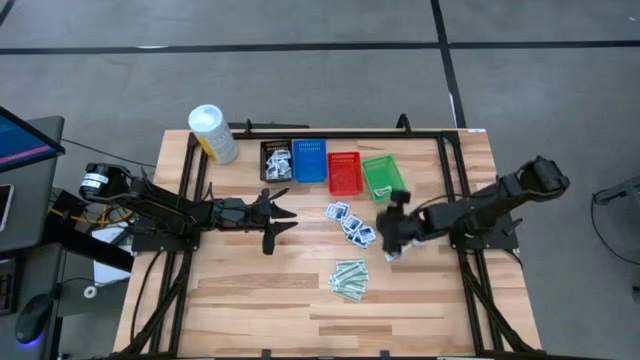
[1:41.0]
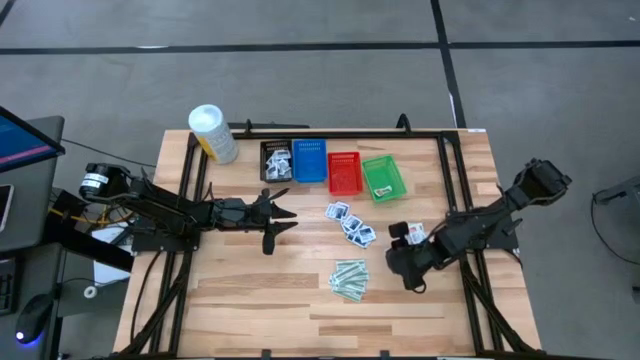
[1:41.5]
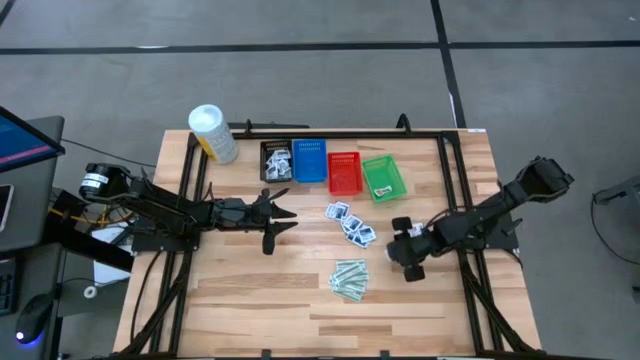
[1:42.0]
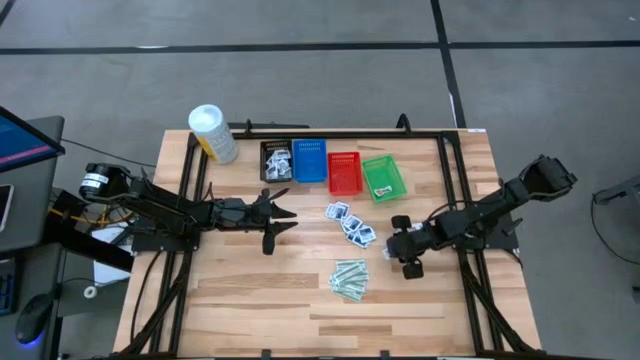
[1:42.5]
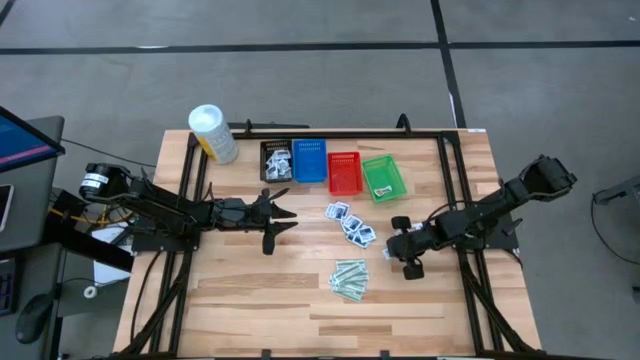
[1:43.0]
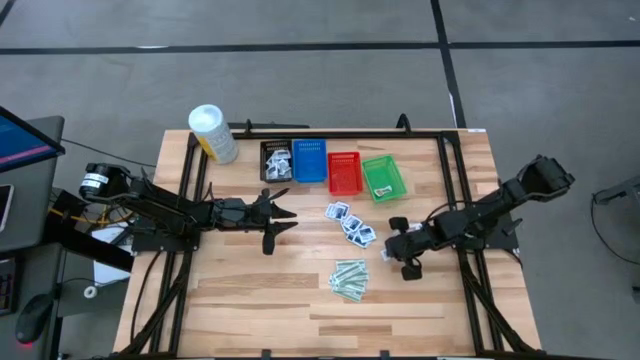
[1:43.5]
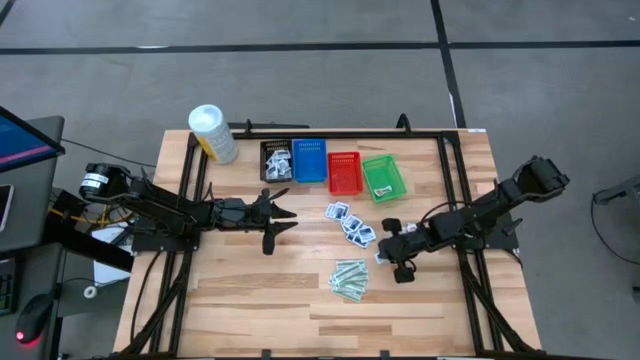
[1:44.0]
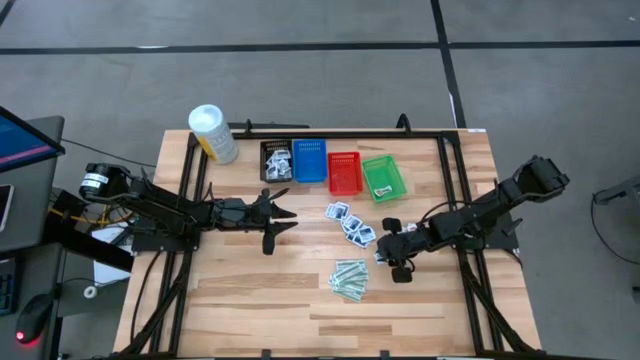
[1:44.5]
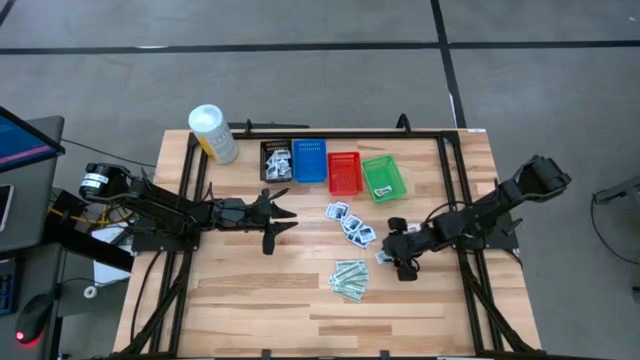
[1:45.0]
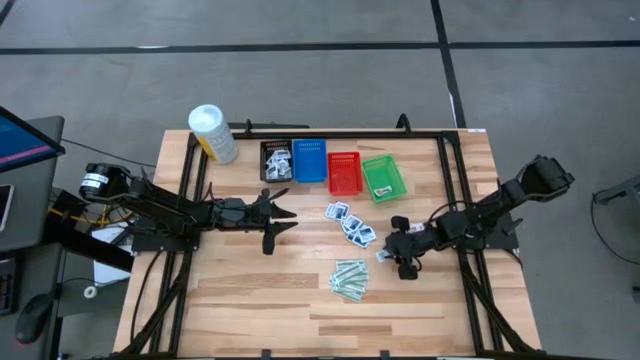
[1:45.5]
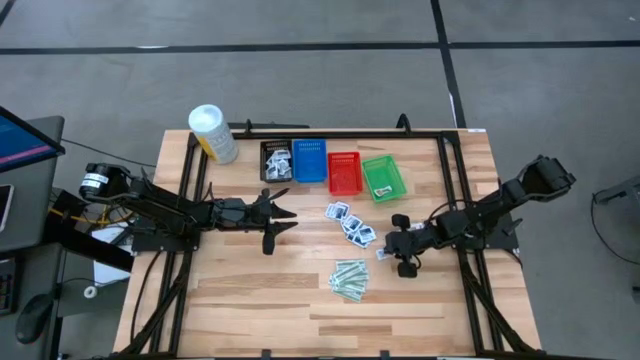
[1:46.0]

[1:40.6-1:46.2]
Task: Pick & Place First Aid Supplies
Put the orange pad into the green bin

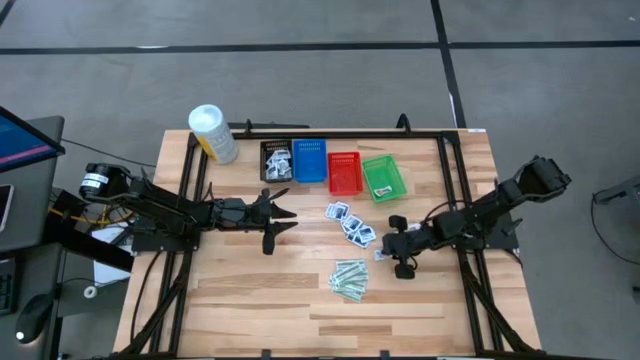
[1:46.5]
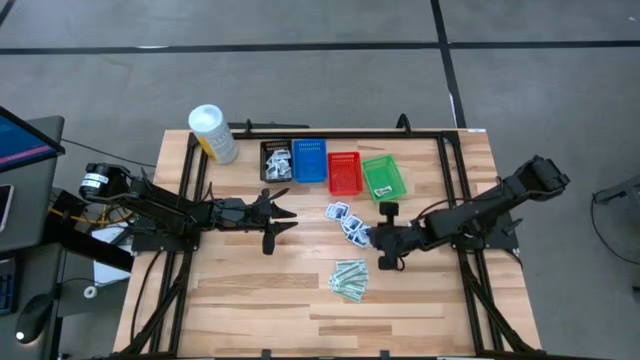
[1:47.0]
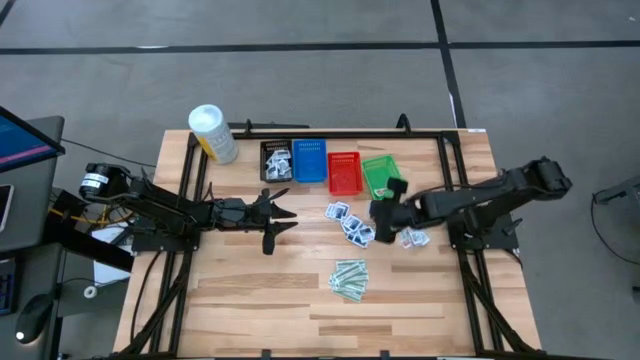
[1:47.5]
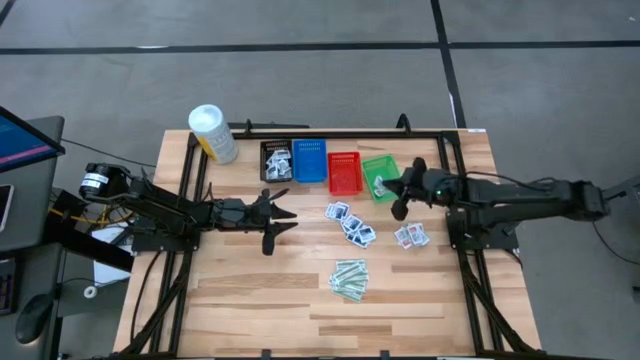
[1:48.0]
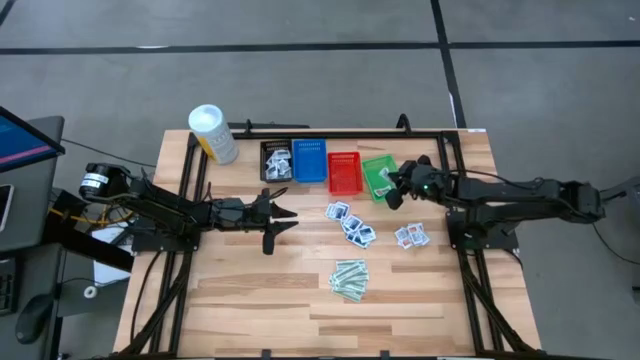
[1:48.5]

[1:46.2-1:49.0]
Put the orange pad into the green bin

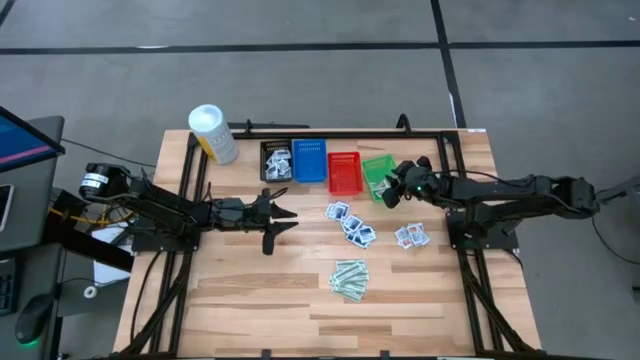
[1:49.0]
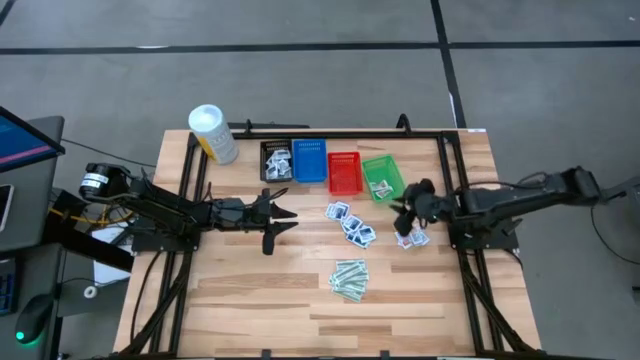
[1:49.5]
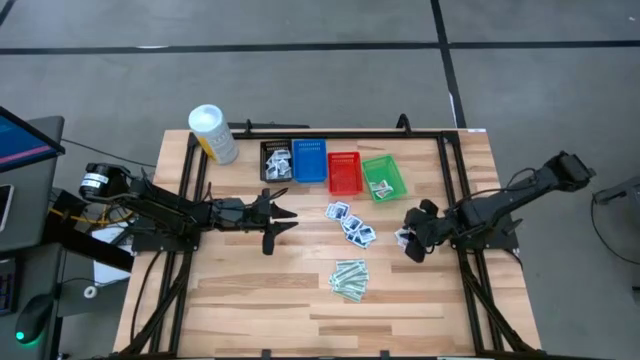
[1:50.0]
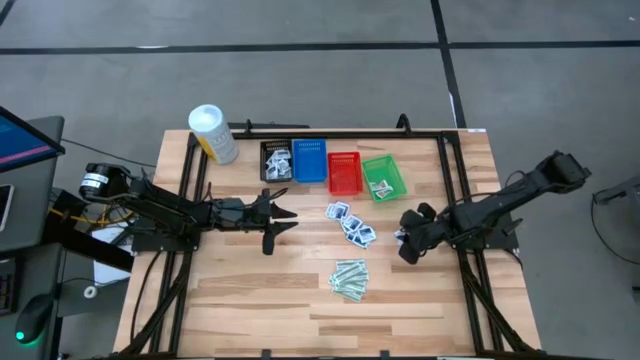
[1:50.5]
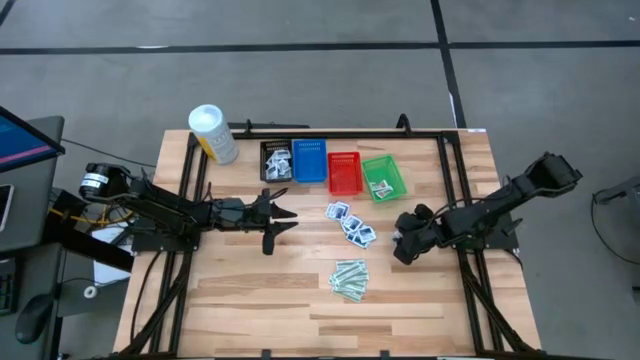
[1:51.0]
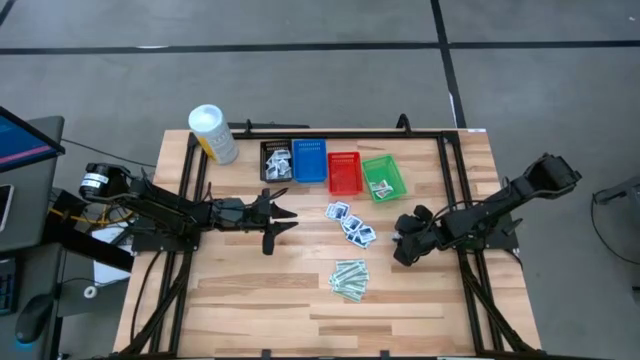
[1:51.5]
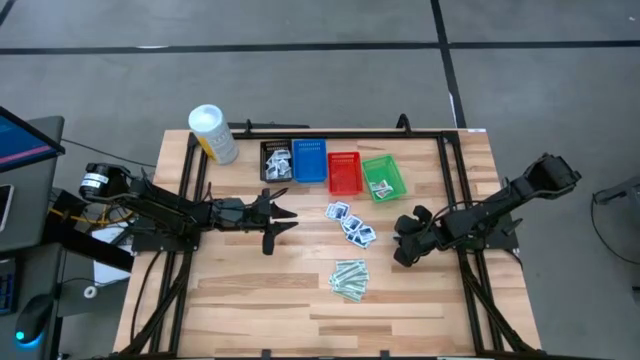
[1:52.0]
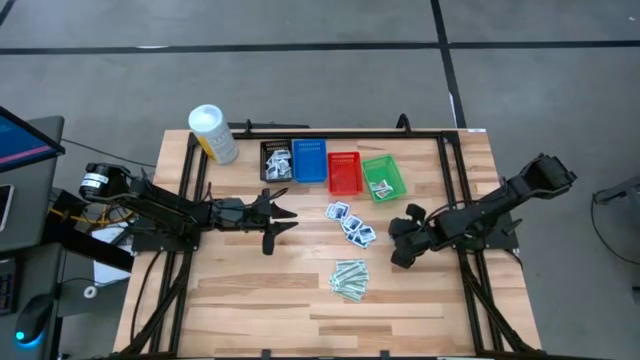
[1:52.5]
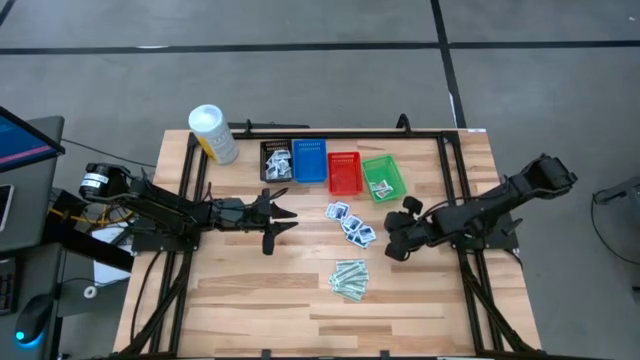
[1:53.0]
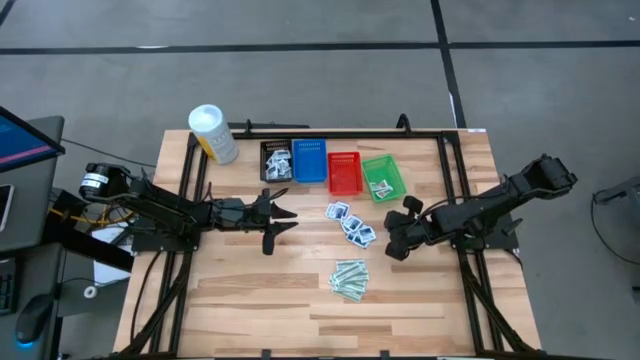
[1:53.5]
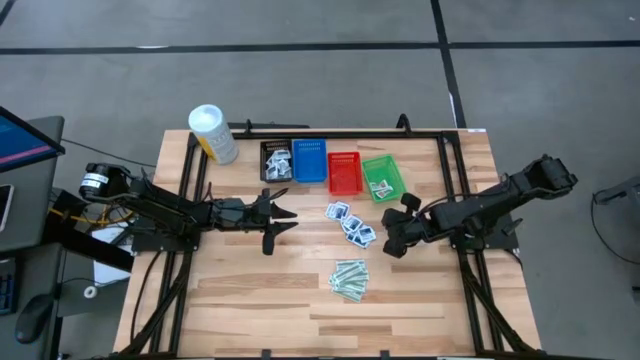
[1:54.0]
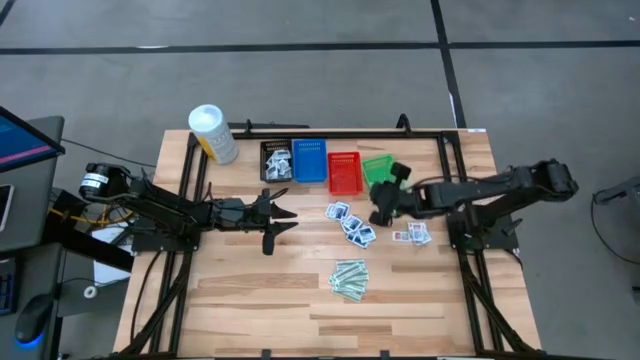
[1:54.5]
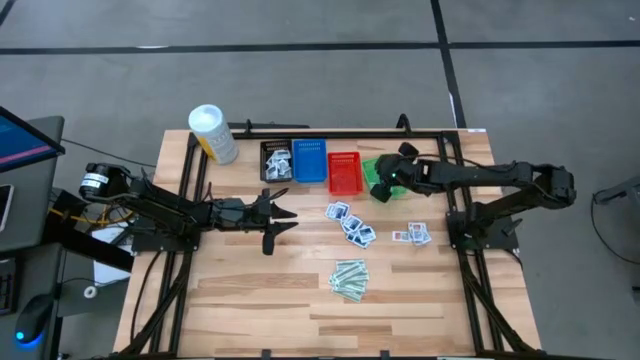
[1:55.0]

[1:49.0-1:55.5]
Put the orange pad into the green bin

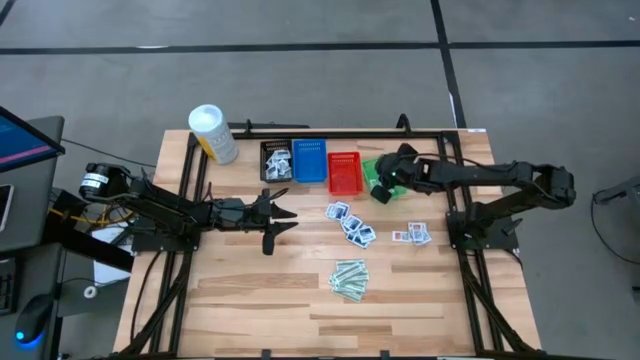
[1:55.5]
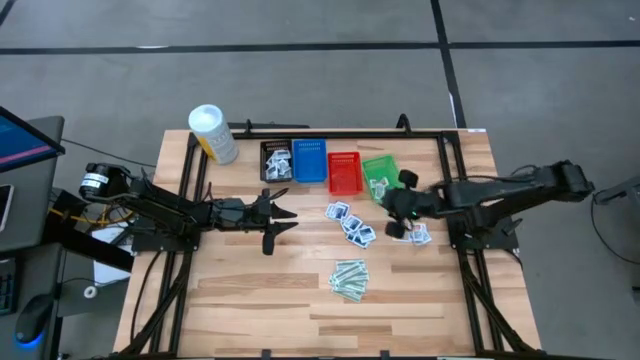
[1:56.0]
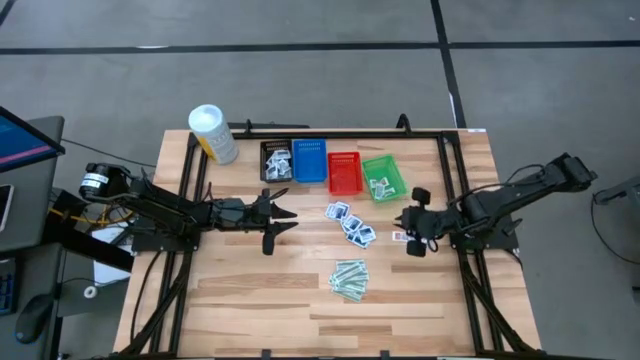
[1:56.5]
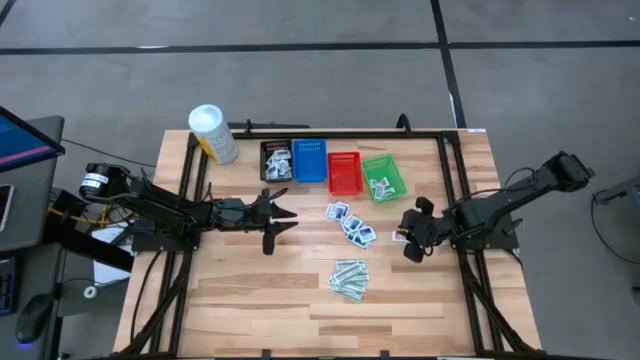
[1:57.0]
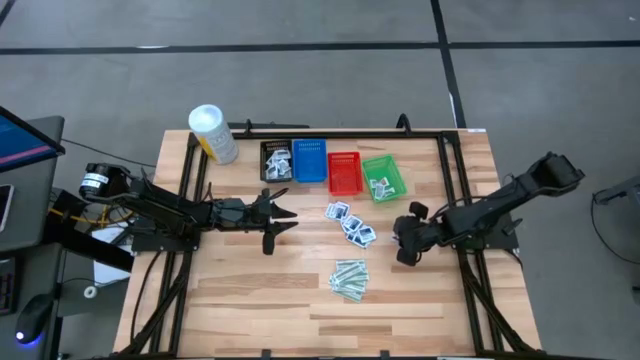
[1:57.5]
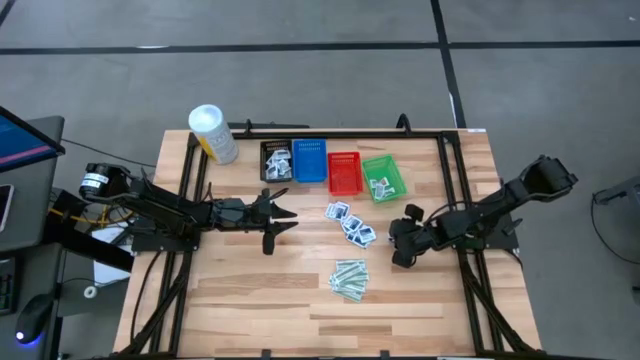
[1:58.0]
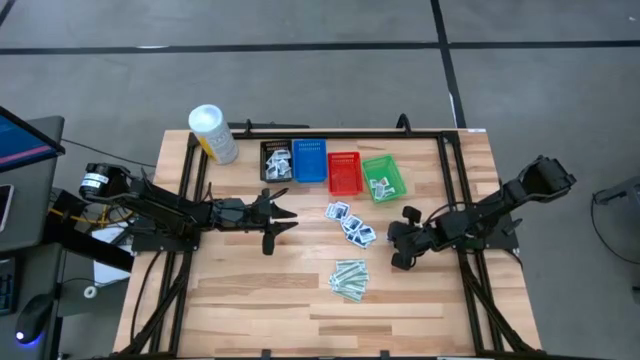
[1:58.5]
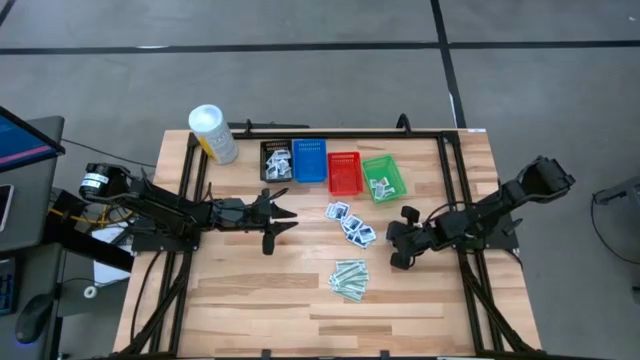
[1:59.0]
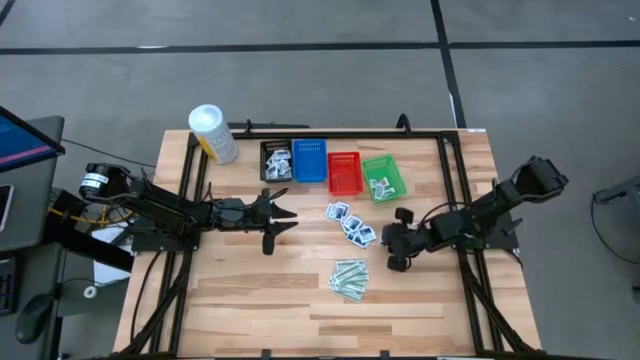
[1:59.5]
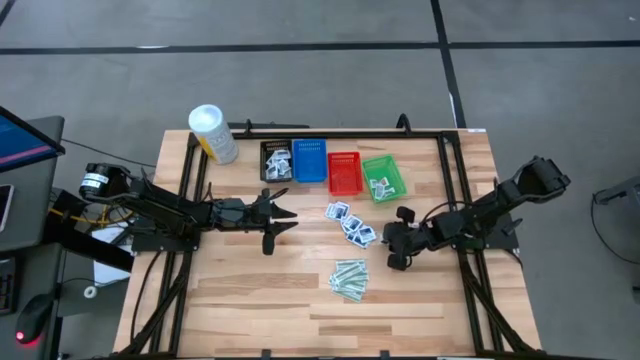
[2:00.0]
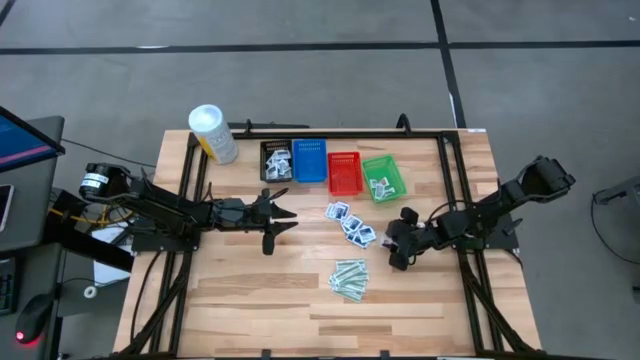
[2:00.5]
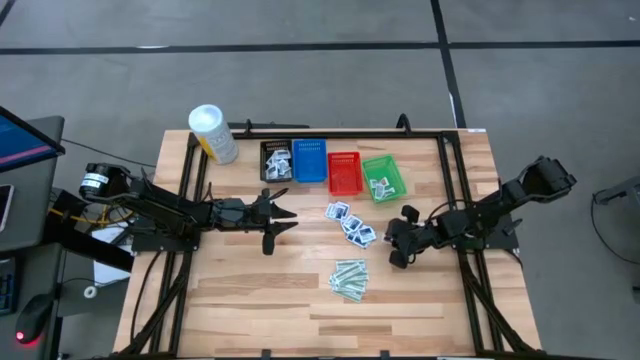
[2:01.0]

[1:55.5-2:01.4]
Put the orange pad into the green bin

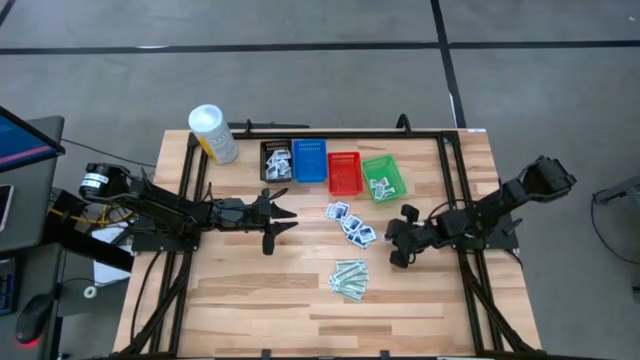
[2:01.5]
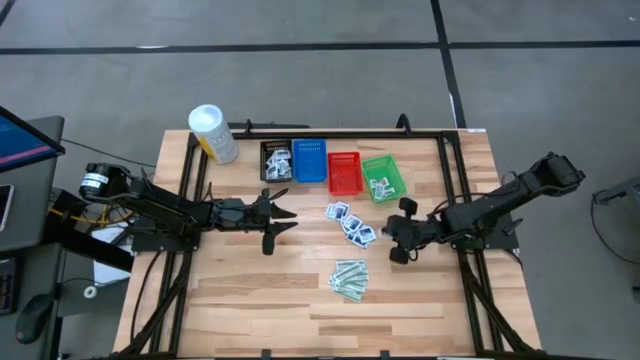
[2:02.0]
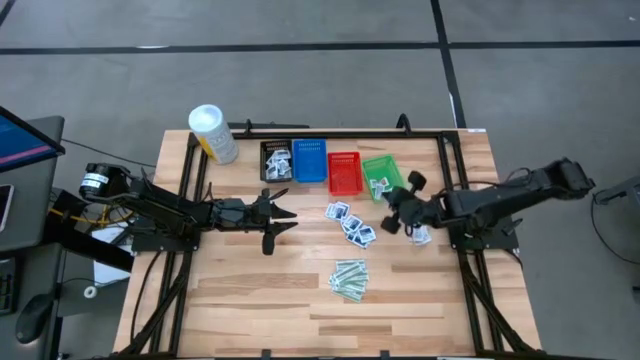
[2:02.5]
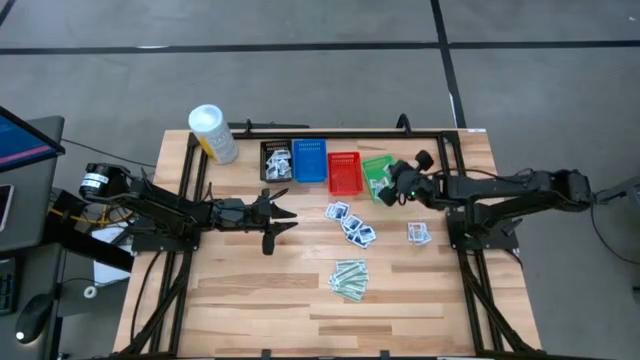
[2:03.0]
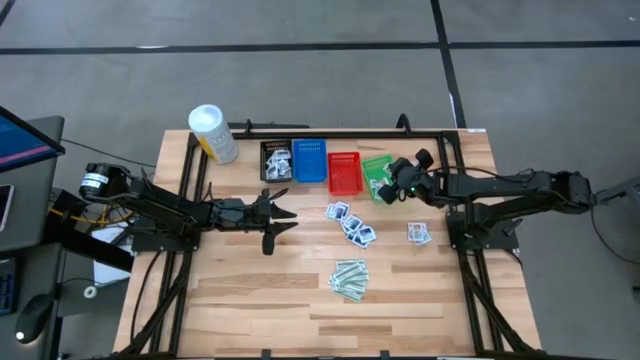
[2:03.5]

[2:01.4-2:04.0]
Put the orange pad into the green bin
